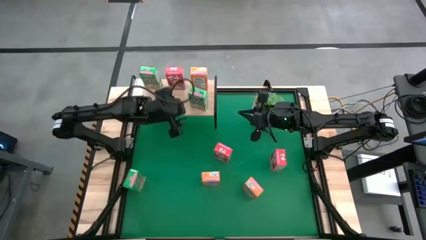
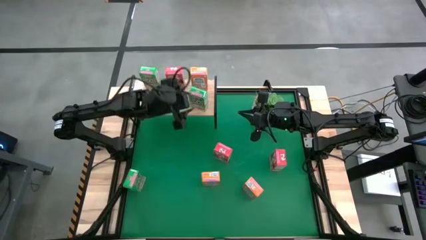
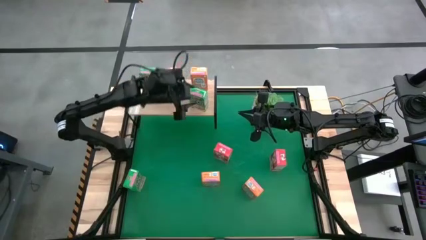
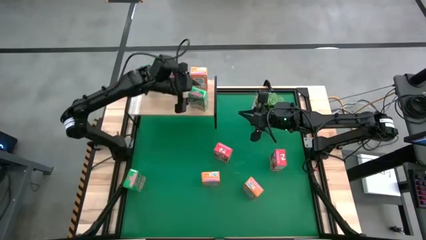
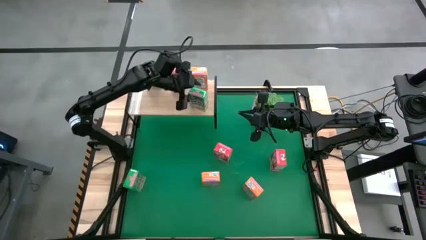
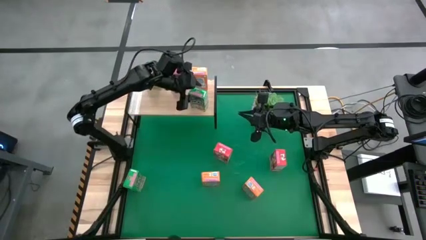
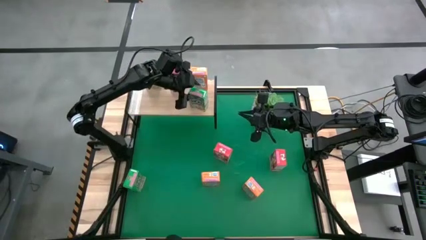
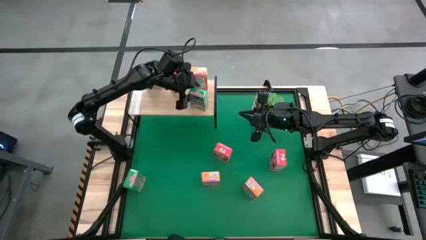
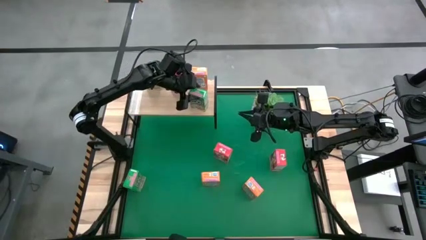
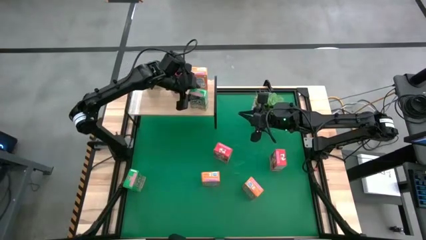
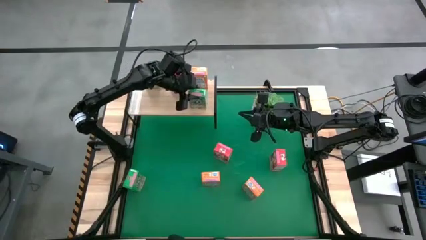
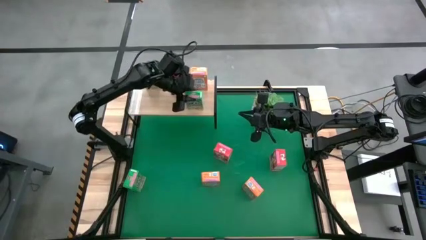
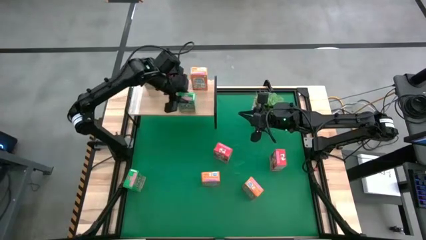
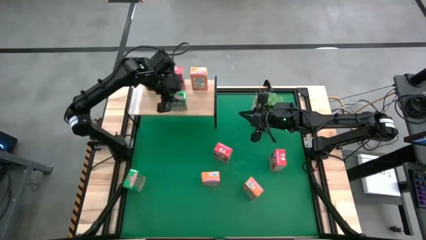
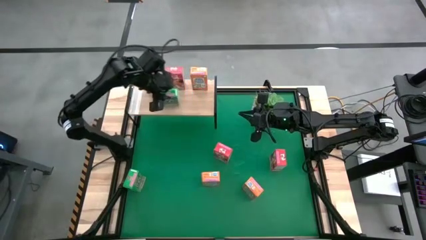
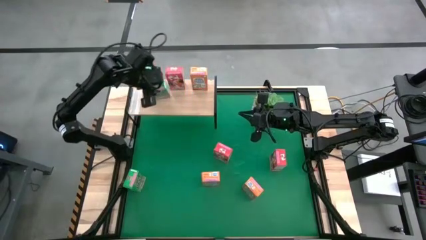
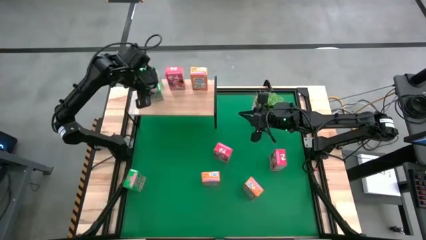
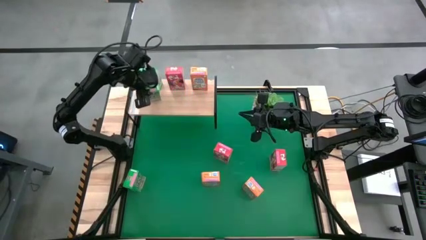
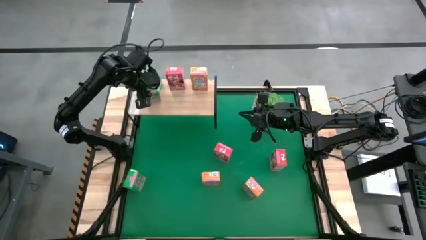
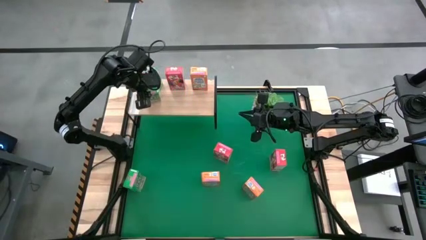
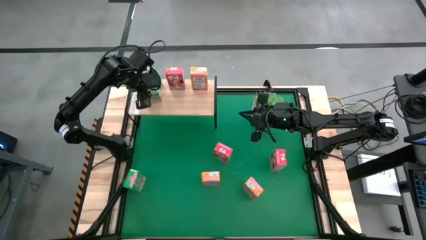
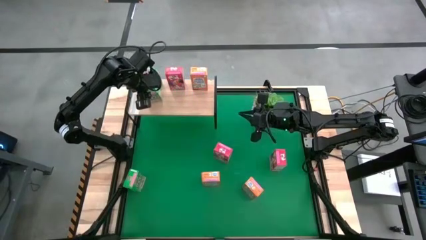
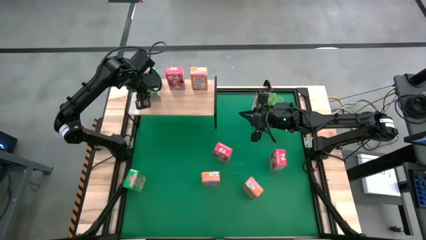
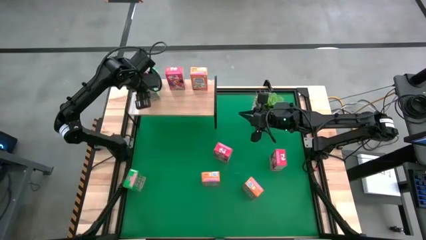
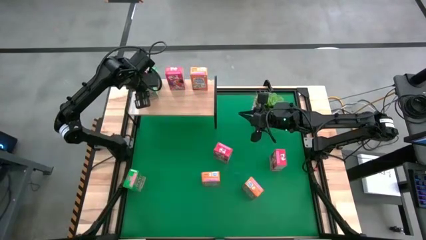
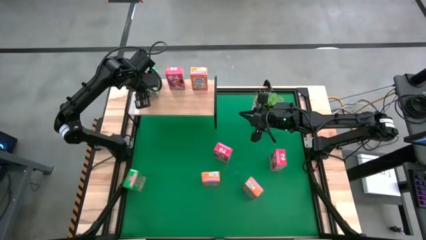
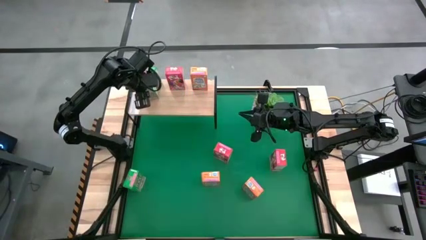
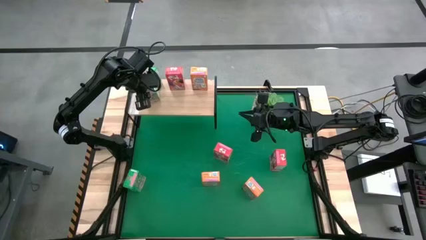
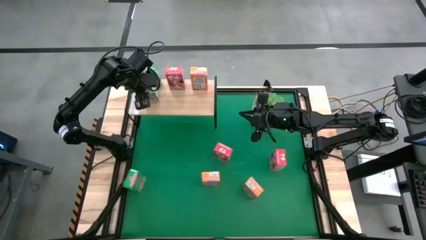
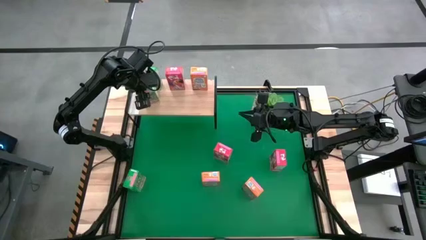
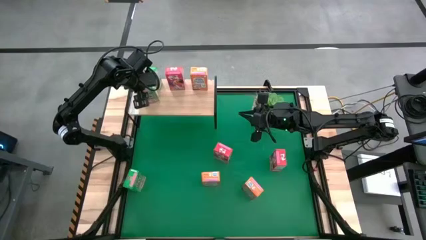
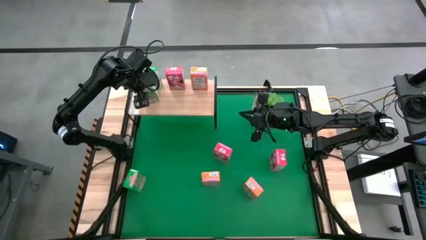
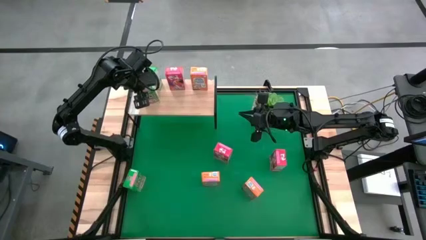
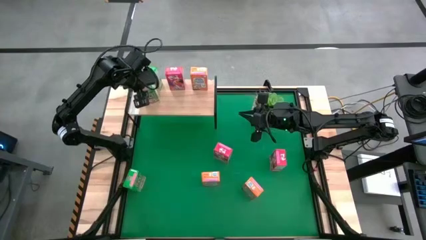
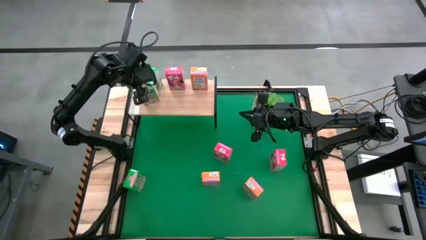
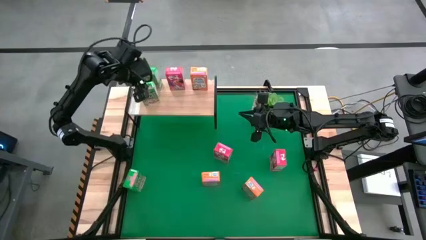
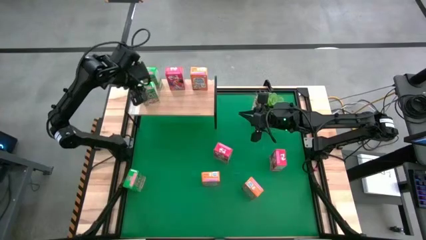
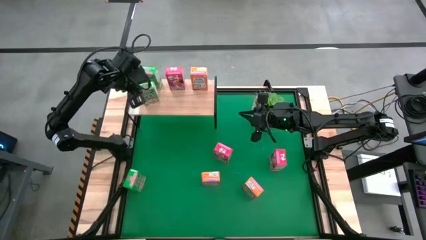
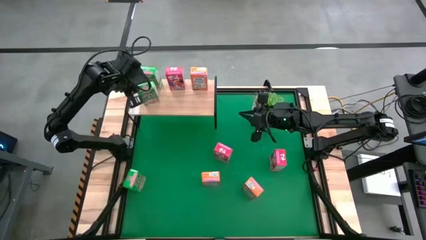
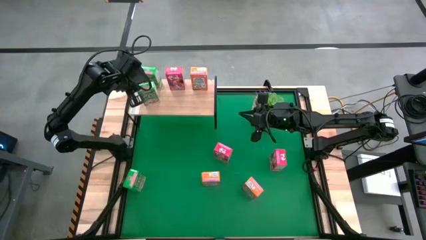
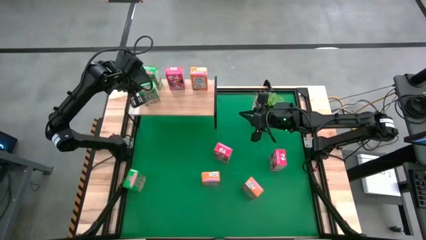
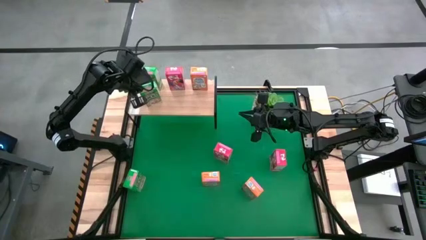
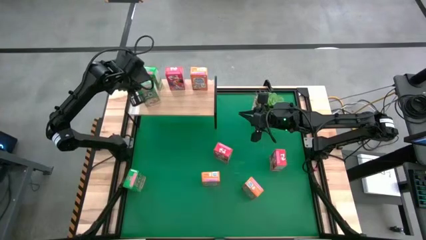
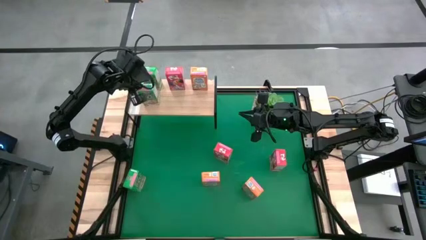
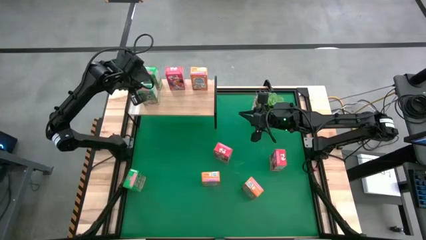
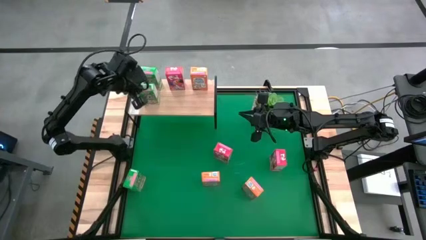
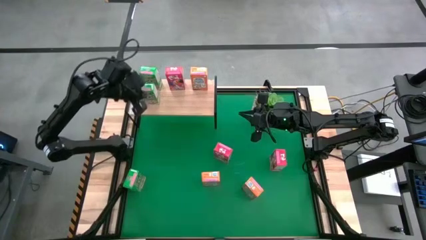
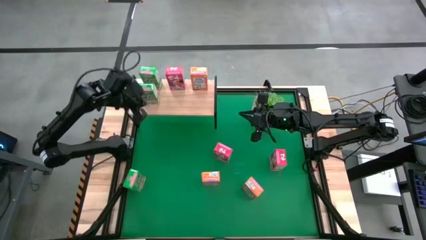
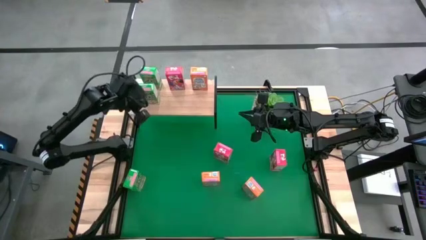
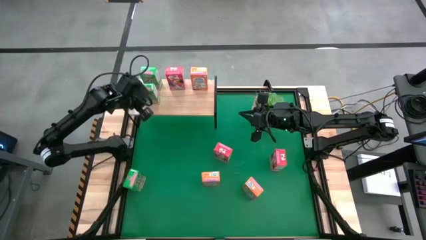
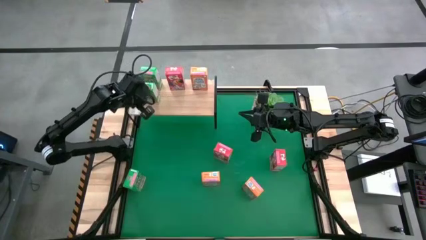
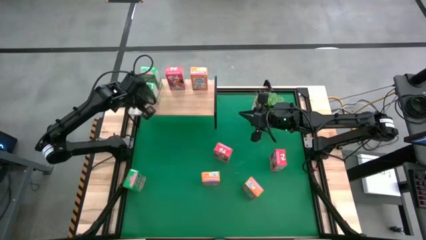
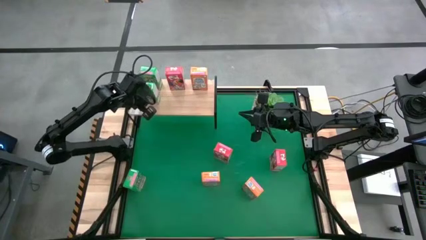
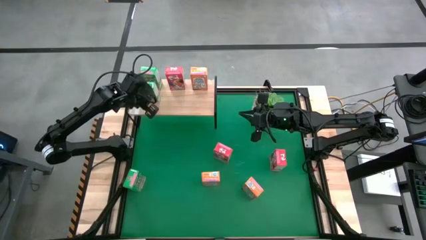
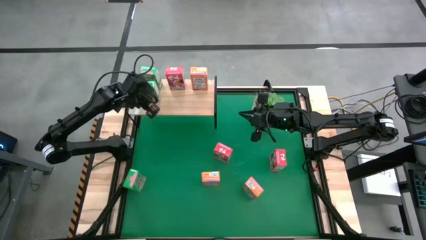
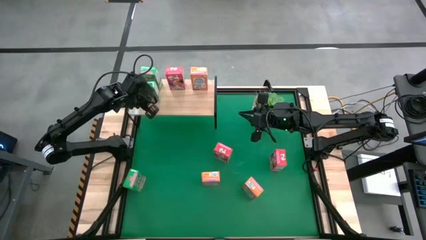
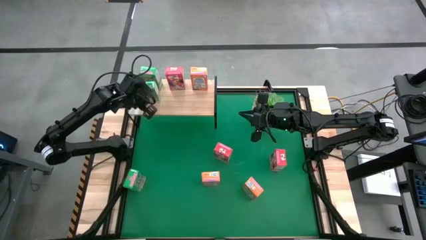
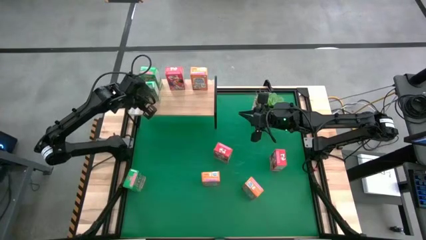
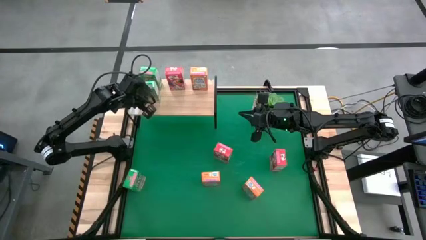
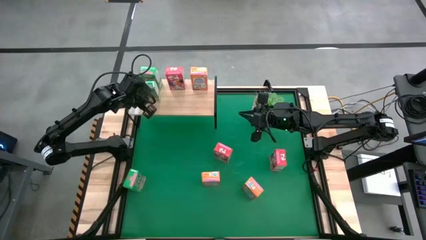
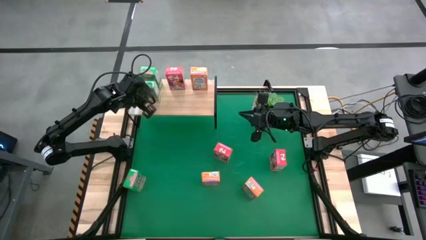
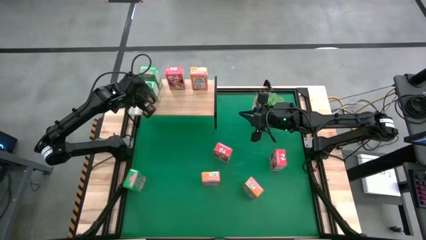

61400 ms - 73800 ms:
Task: Stack cereal on shelf
Put the top green cereal box on the shelf aligned with other green cereal box

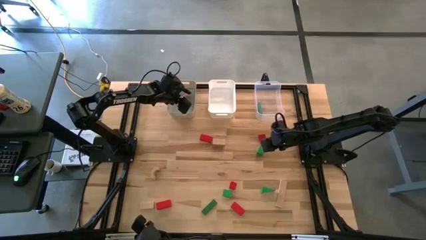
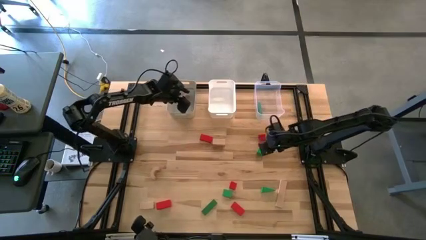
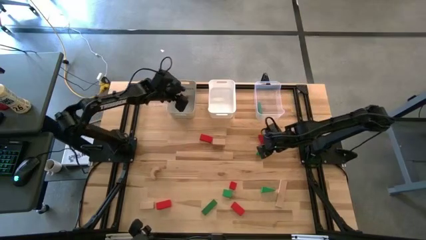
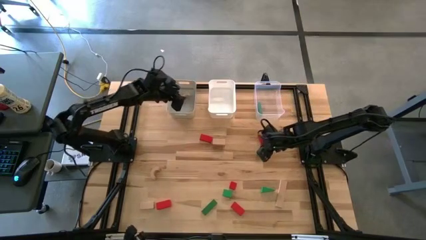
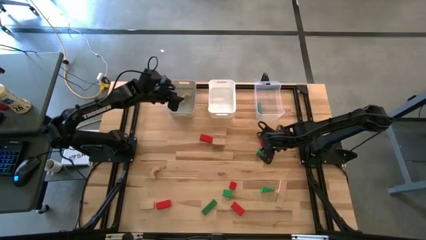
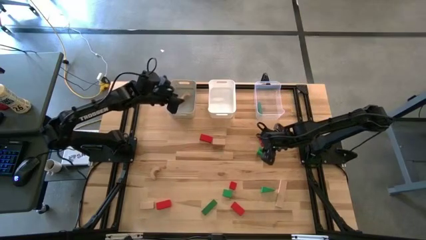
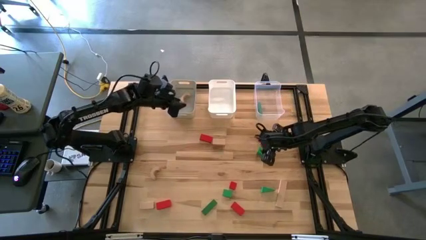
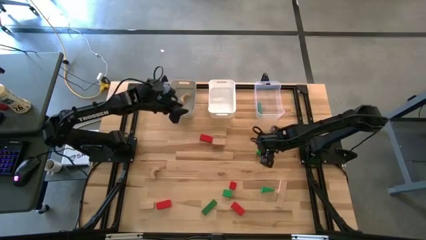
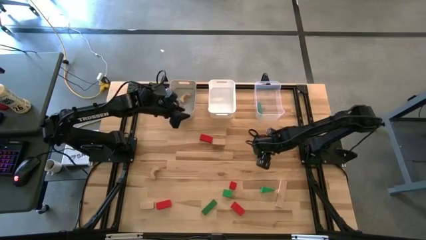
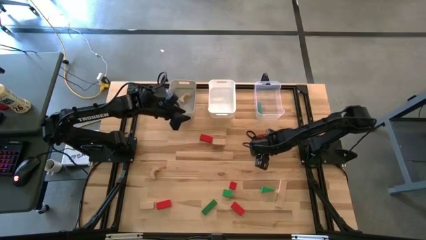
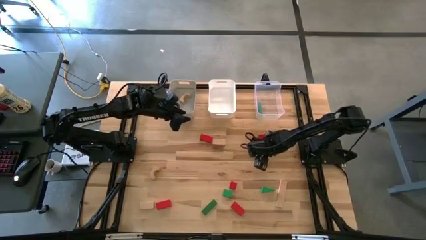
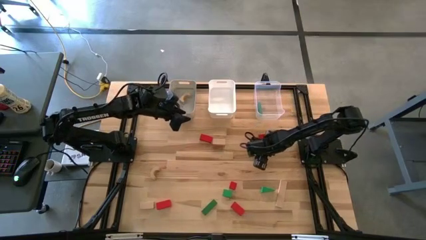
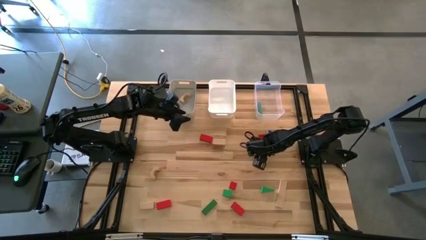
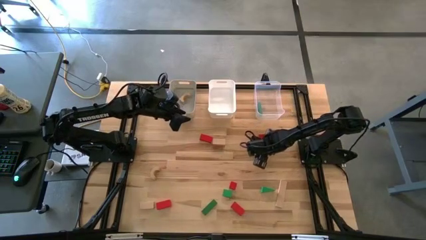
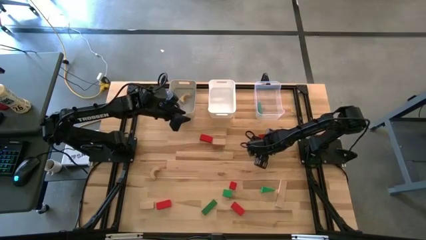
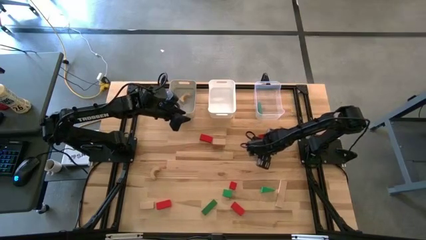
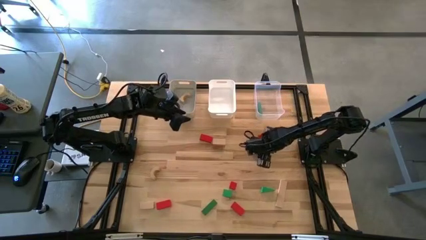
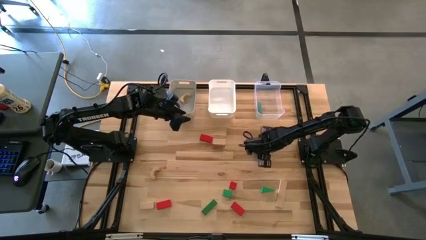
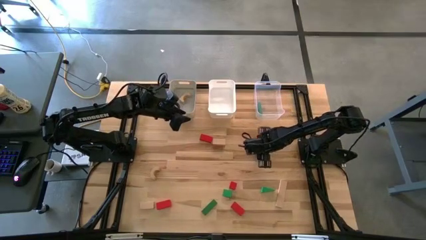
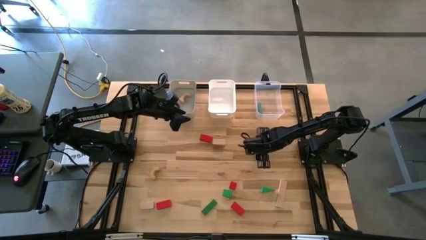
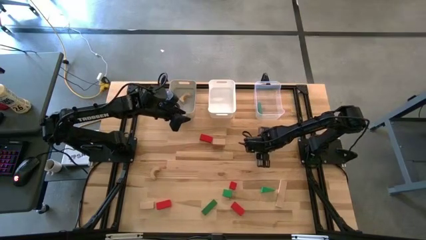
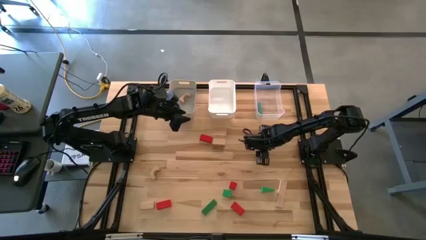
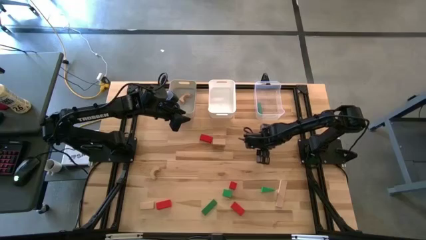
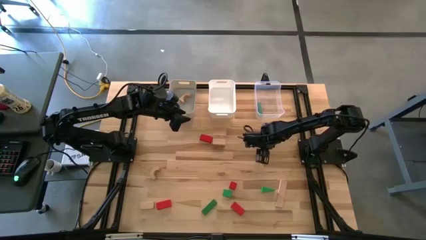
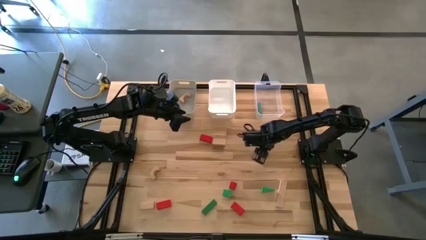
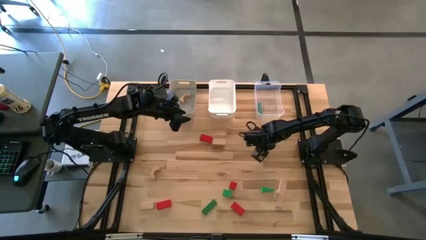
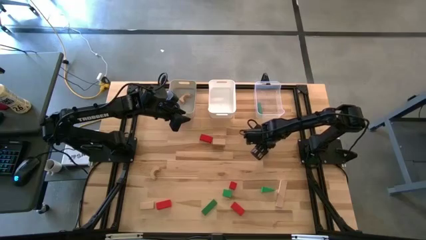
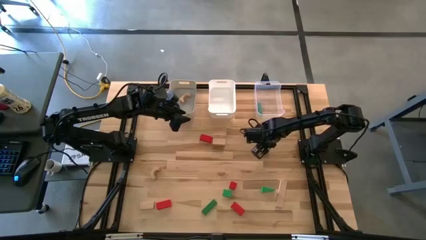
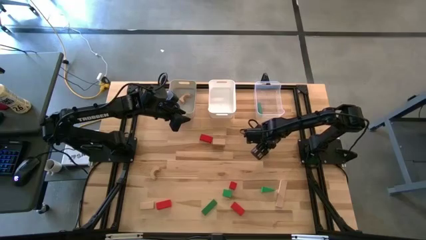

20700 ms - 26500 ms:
Task: Sort & place blocks by color
Put the green block into the transparent bin
